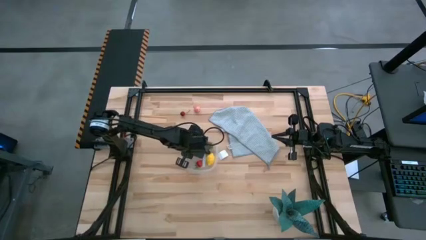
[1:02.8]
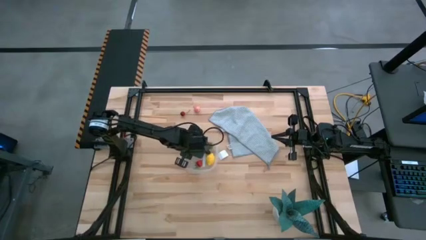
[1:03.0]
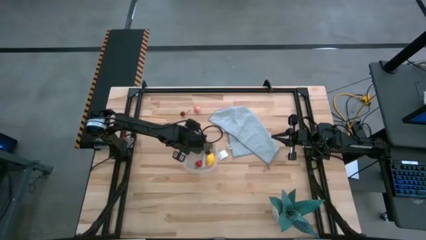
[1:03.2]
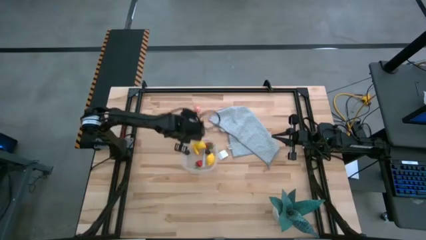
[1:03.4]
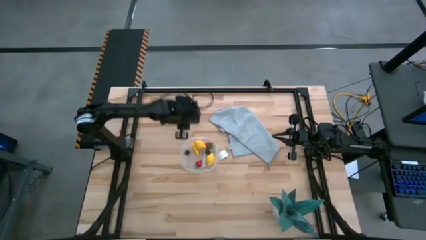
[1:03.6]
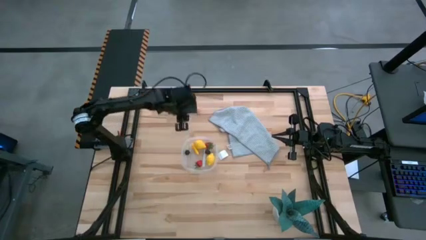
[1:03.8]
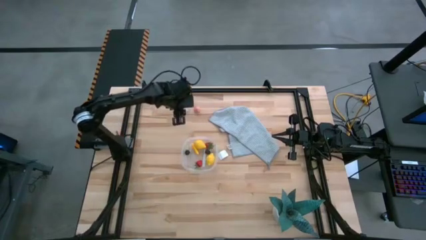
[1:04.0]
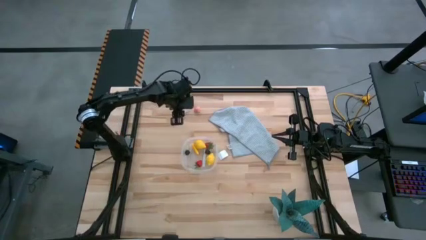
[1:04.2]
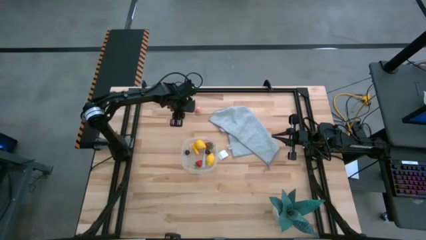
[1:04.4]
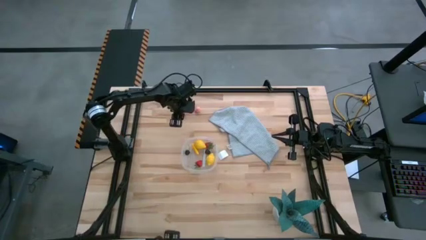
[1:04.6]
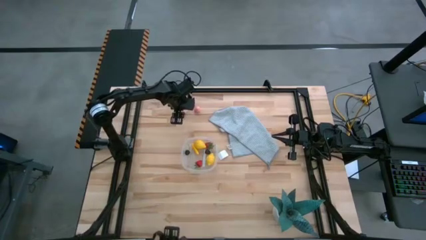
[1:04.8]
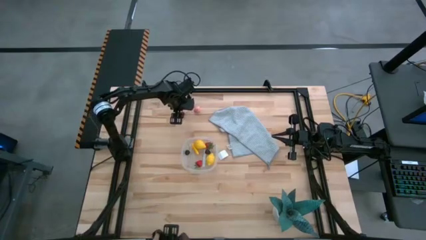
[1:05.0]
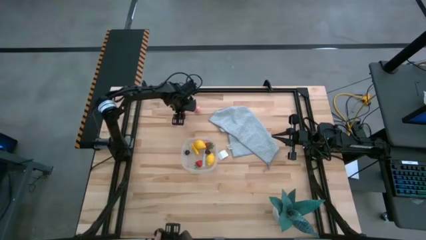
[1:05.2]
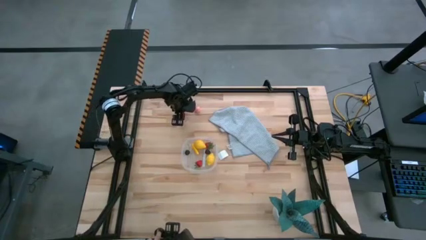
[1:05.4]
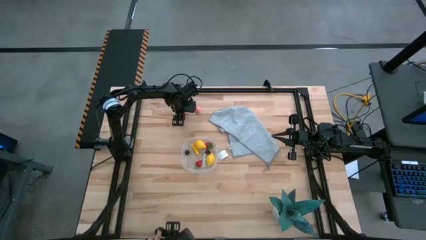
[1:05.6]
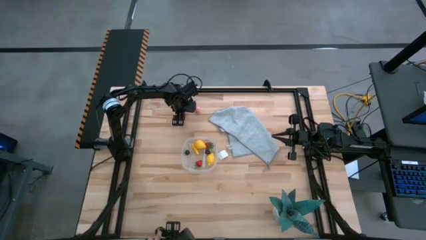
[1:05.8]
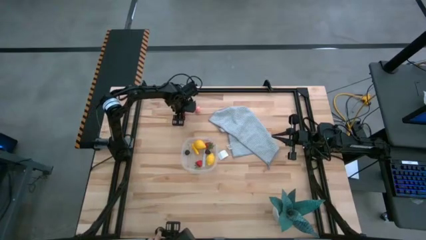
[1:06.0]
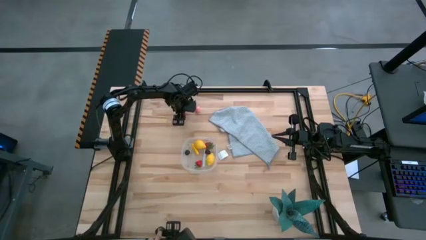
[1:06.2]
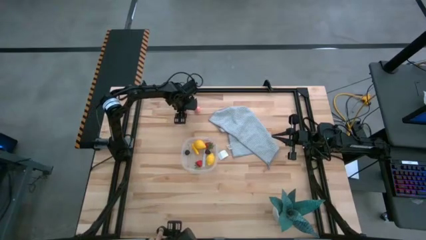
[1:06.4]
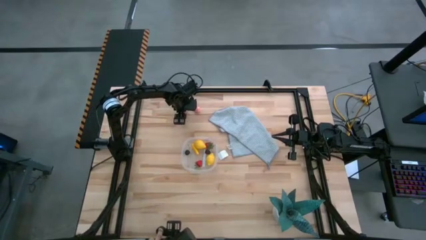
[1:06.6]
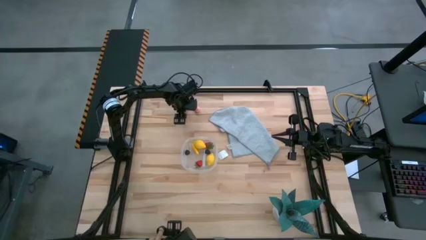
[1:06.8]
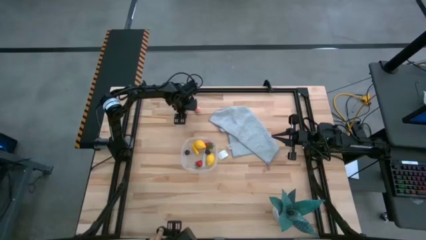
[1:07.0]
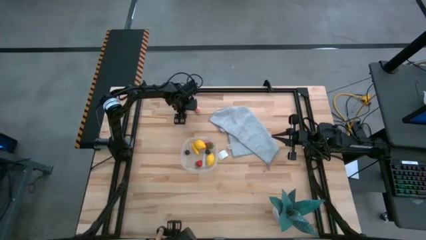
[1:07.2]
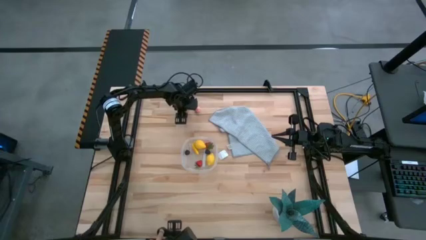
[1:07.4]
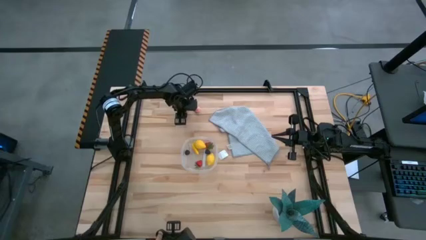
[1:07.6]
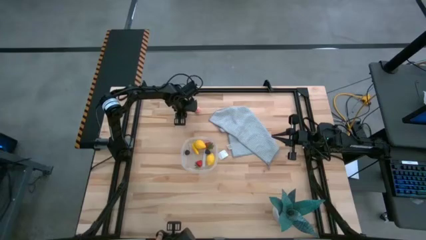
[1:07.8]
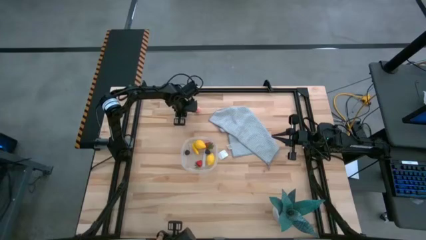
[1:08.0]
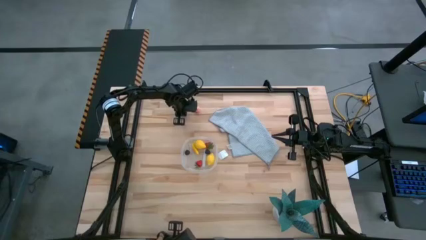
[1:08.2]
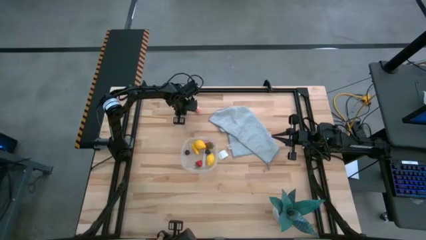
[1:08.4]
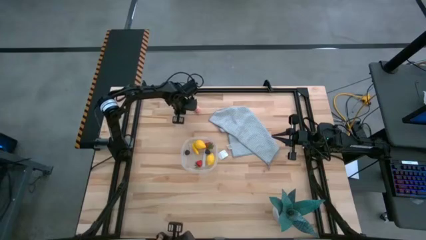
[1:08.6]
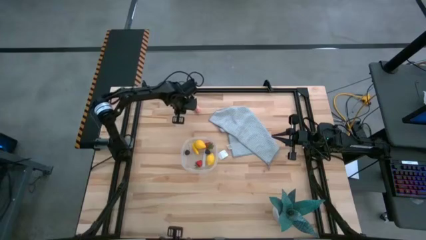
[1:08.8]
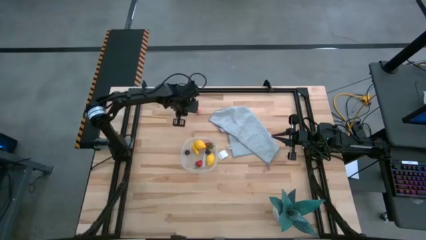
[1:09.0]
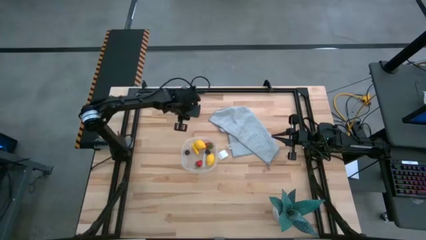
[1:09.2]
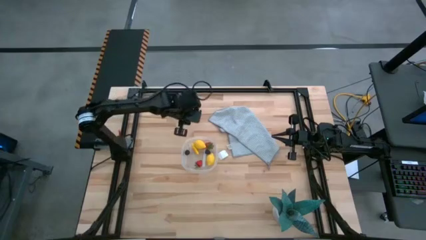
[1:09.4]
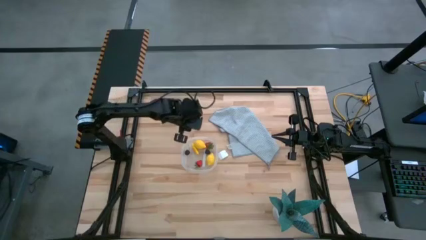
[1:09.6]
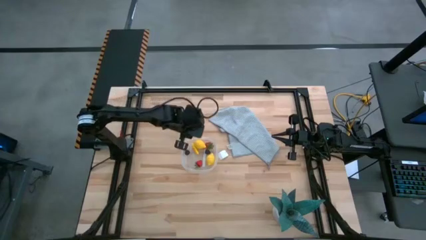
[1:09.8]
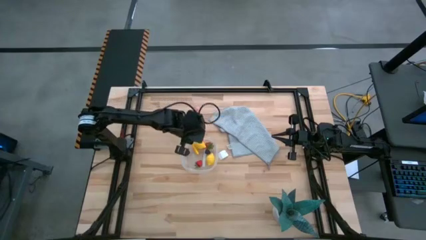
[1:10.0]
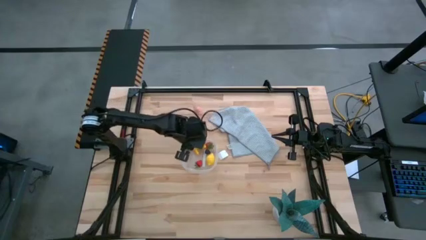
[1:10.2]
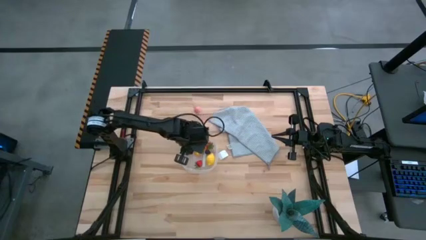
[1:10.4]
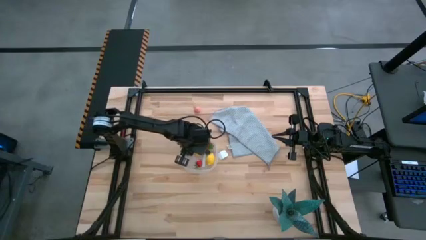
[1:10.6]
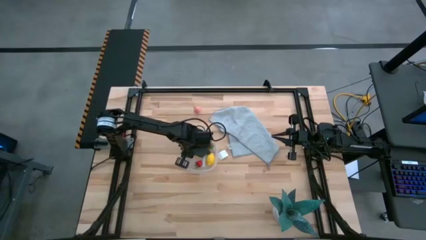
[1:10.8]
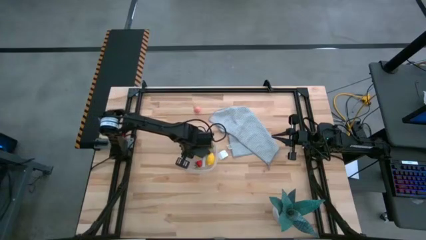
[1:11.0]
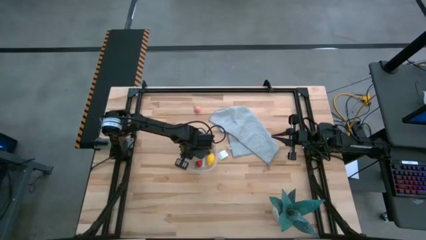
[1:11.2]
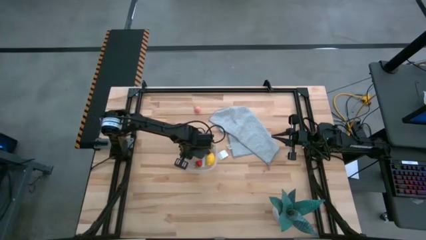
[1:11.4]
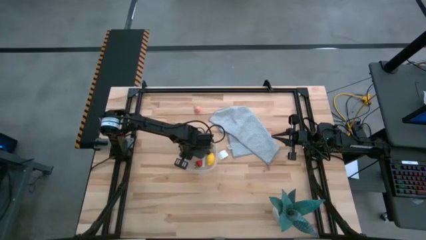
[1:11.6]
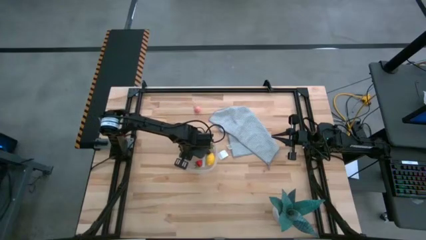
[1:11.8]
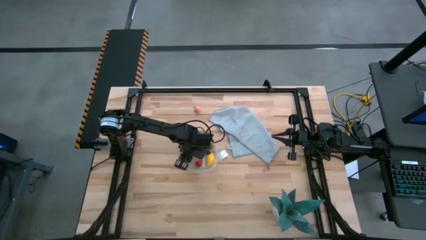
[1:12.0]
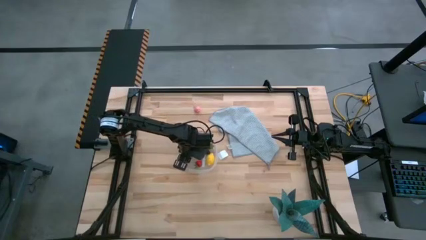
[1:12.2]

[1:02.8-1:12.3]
Task: Pick and placing Produce into tupperware
Put the red cherry into the transparent bin

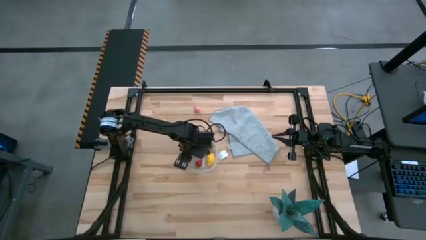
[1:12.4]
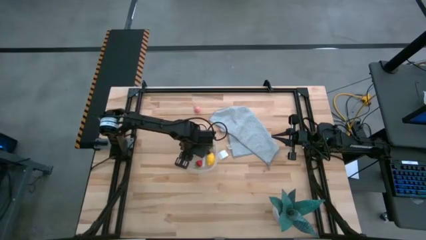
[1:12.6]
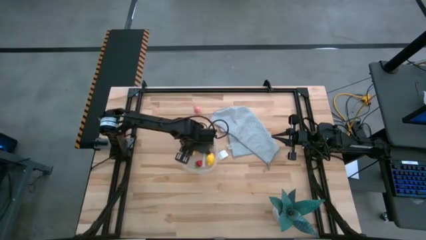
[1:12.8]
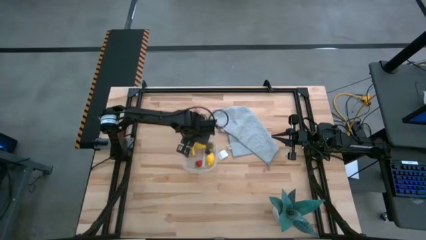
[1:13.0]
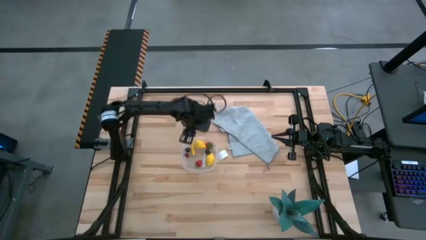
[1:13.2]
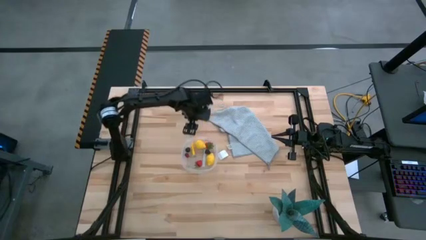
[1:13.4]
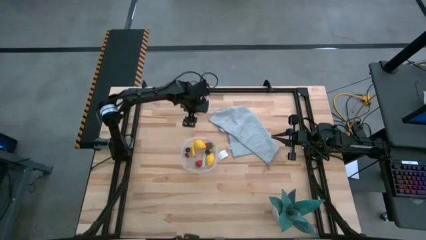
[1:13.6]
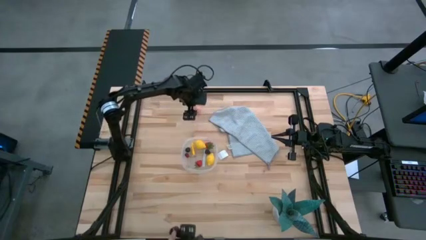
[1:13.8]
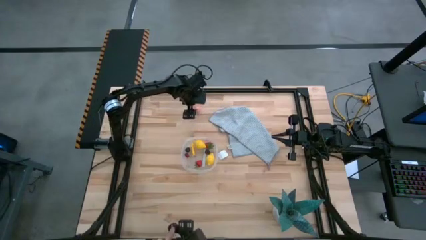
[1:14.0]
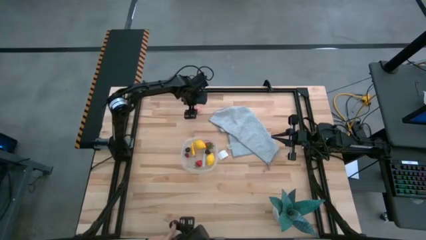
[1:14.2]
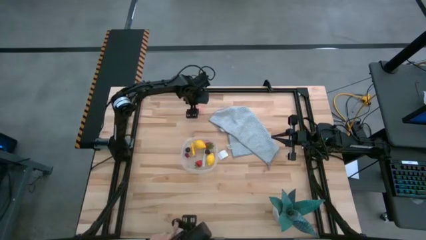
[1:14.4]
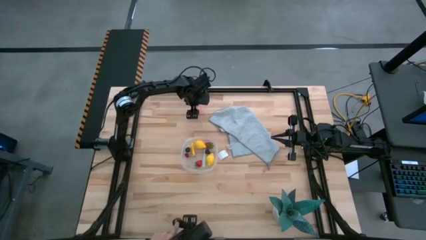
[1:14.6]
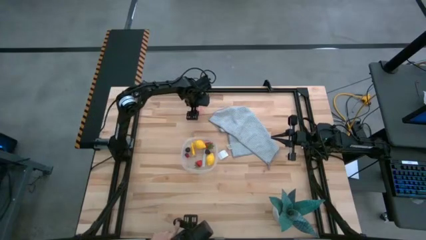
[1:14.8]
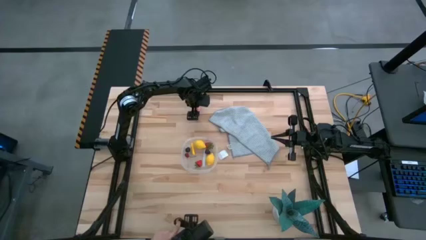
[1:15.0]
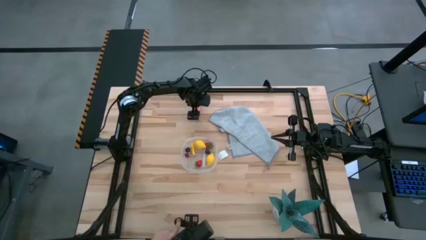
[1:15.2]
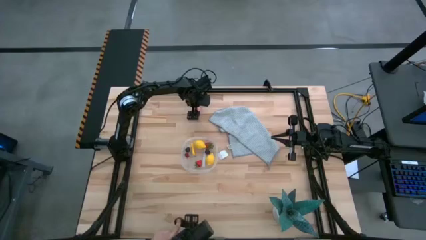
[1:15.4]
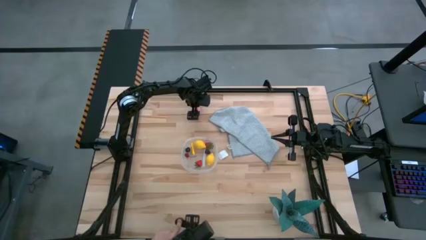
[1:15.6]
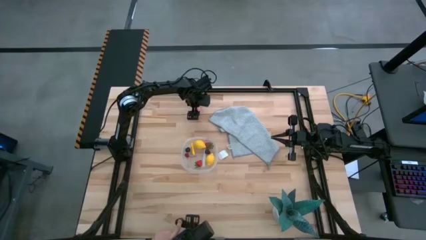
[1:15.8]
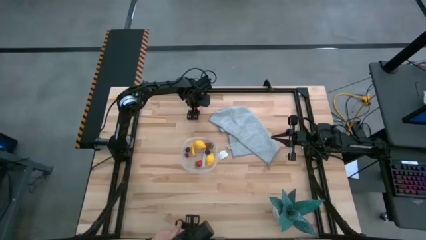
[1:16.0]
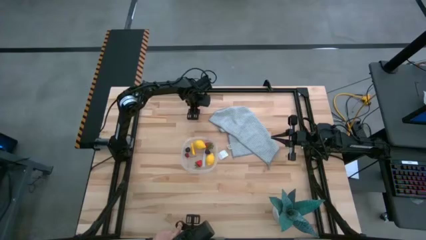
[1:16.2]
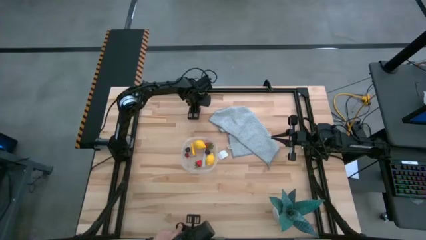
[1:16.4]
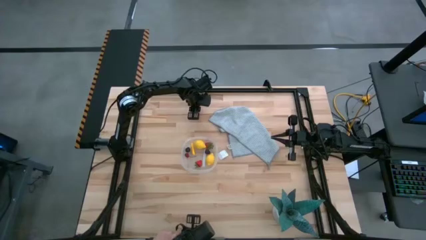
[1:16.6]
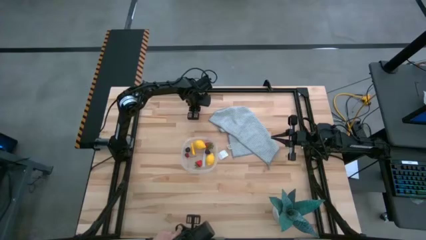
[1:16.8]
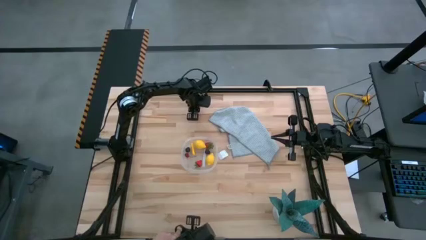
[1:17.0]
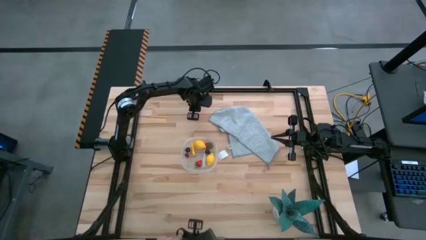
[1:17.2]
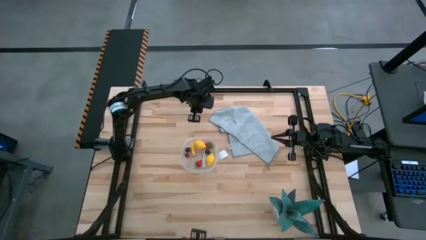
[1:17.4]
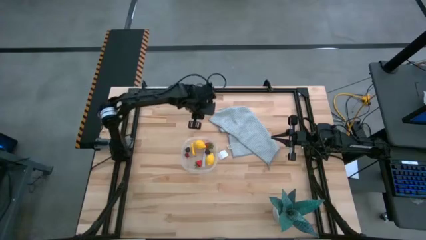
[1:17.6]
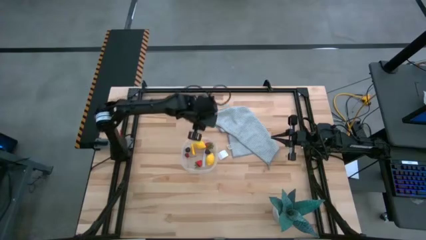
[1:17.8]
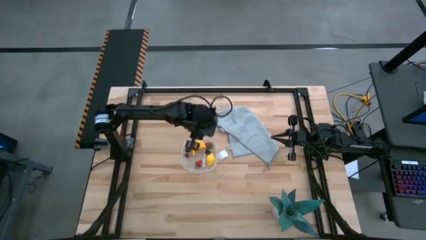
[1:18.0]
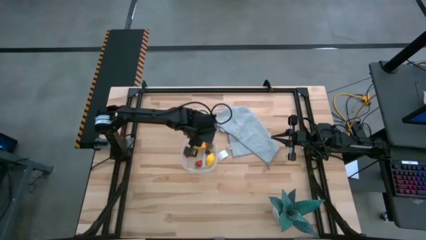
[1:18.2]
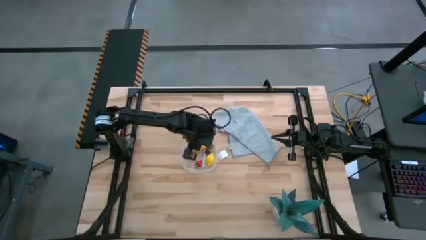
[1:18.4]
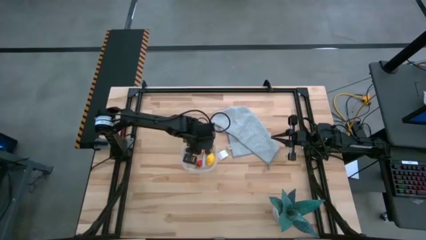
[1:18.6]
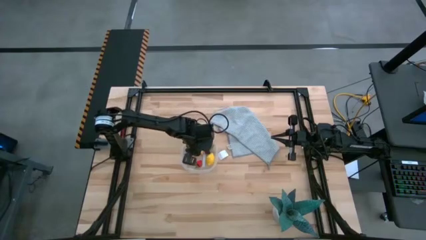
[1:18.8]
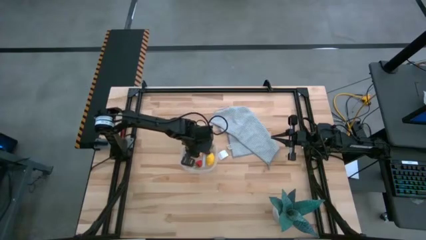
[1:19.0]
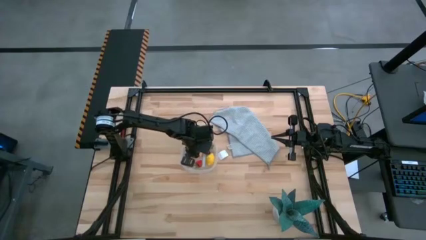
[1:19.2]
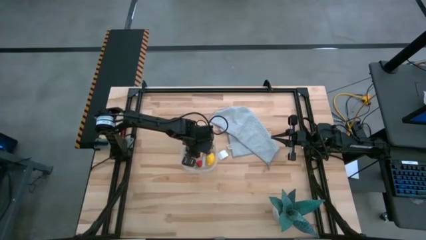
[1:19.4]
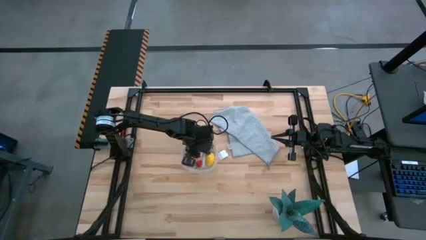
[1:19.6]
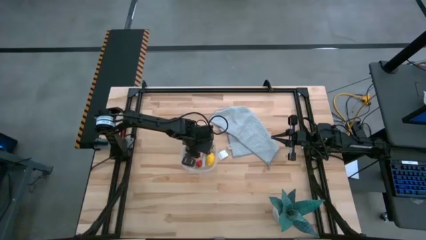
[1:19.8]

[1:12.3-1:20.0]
Put the pink peach into the transparent bin
